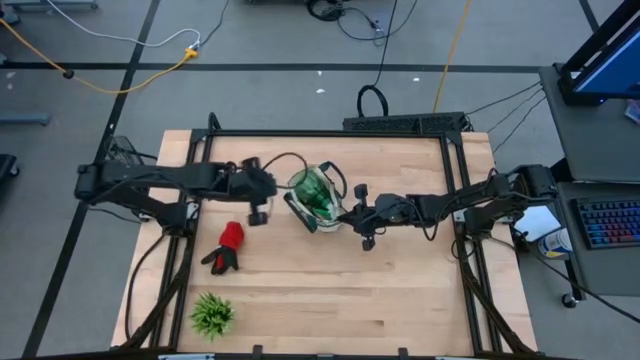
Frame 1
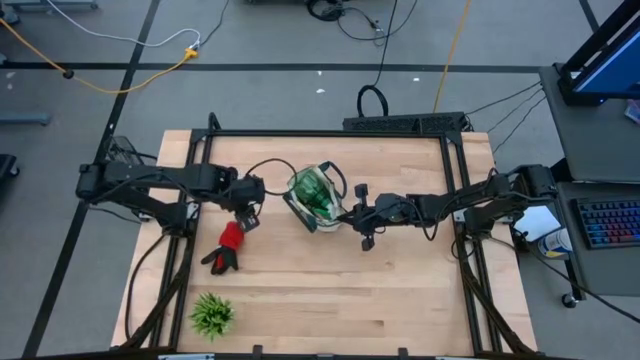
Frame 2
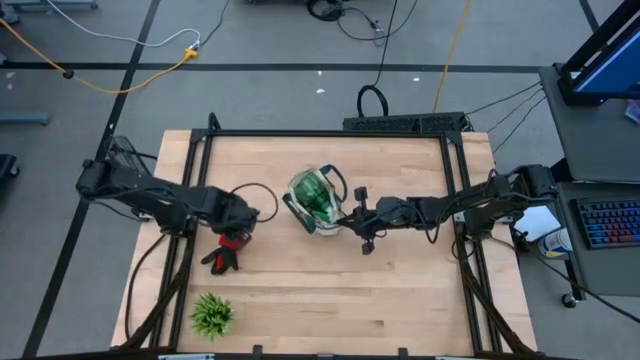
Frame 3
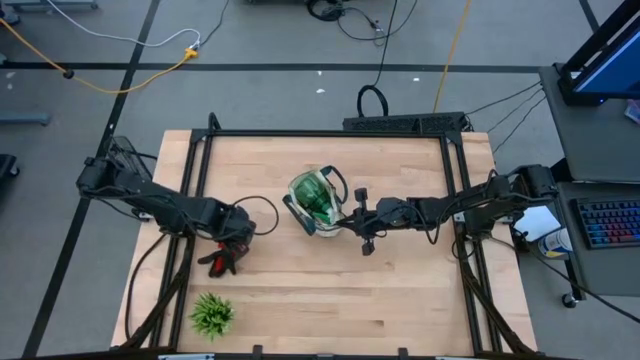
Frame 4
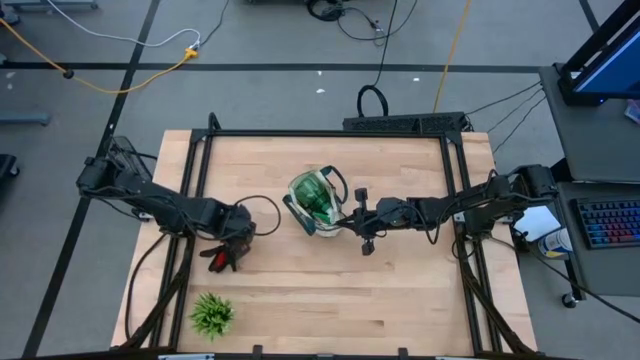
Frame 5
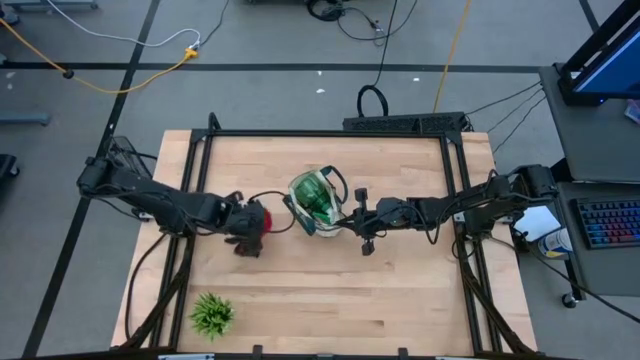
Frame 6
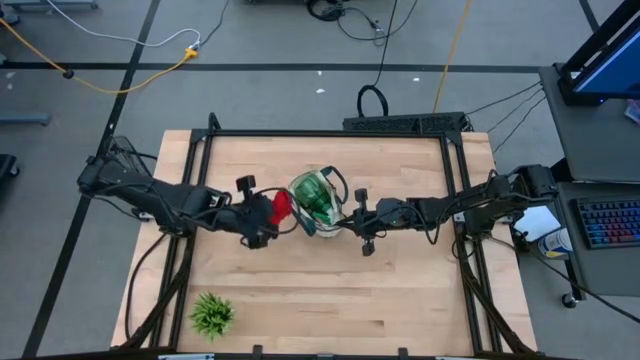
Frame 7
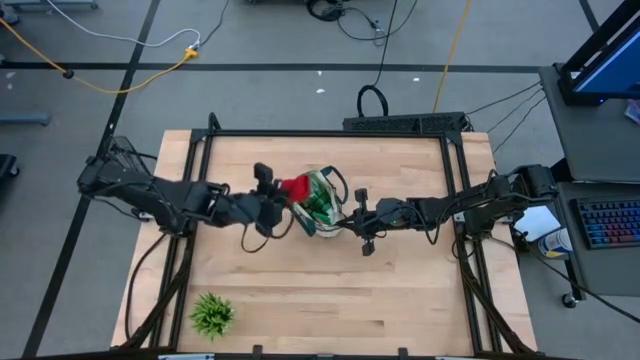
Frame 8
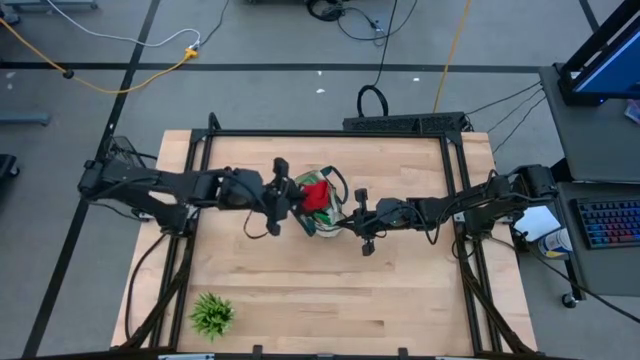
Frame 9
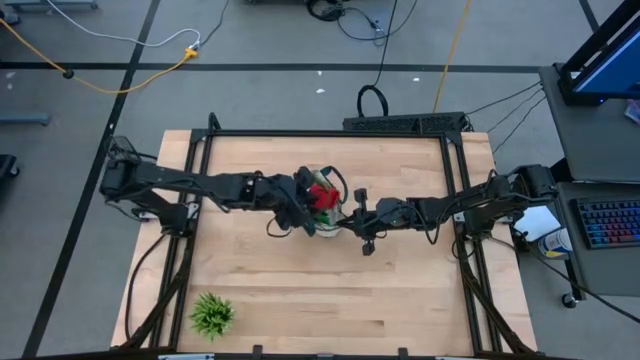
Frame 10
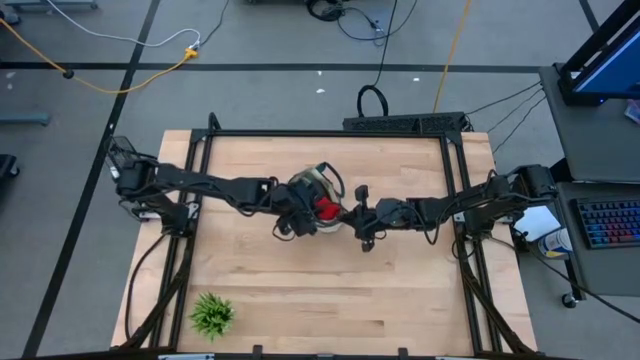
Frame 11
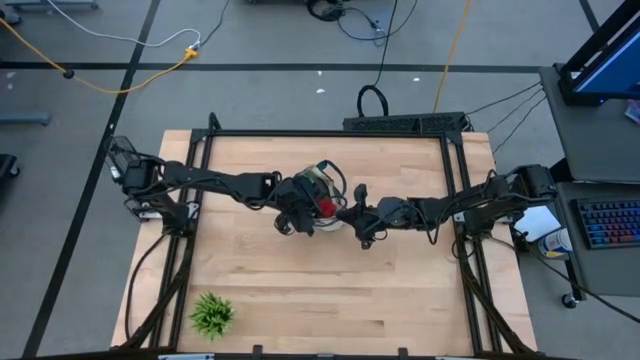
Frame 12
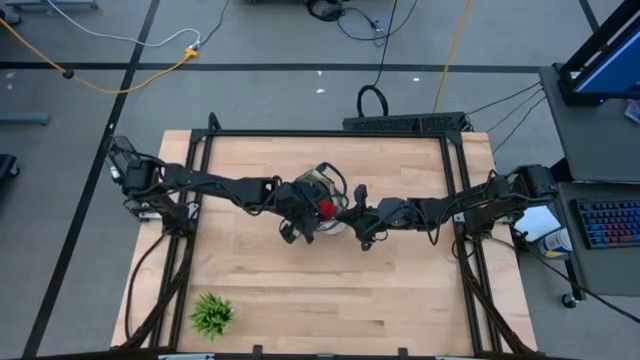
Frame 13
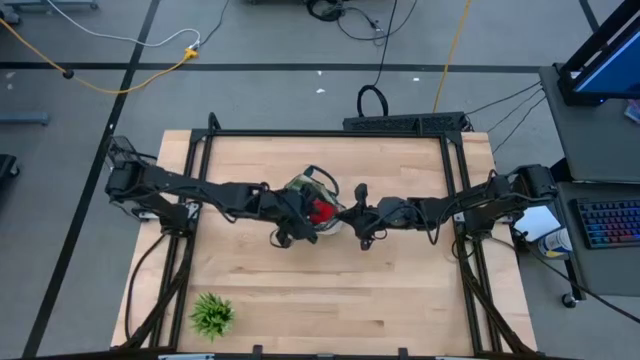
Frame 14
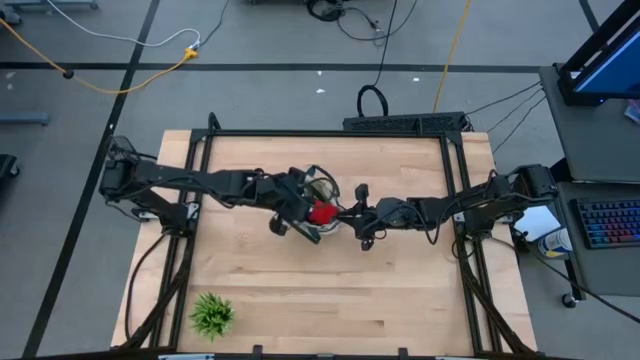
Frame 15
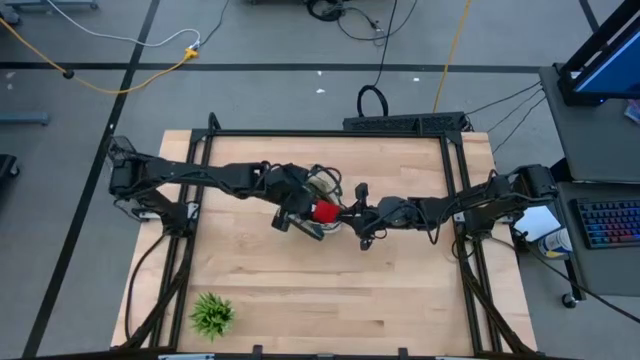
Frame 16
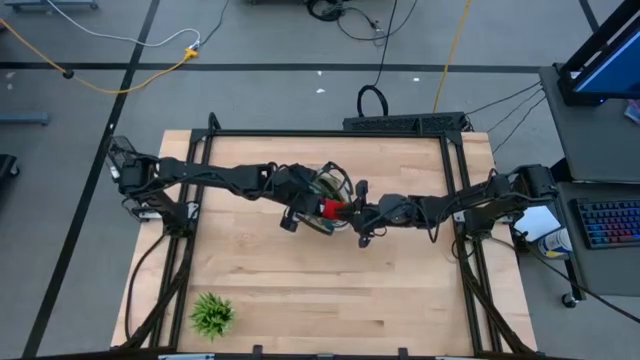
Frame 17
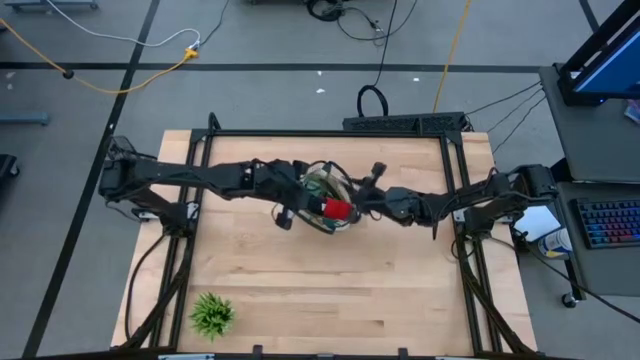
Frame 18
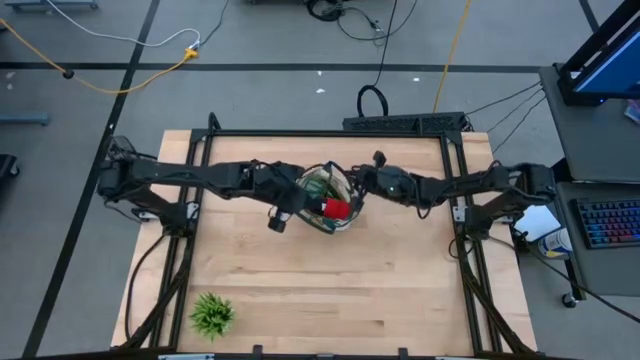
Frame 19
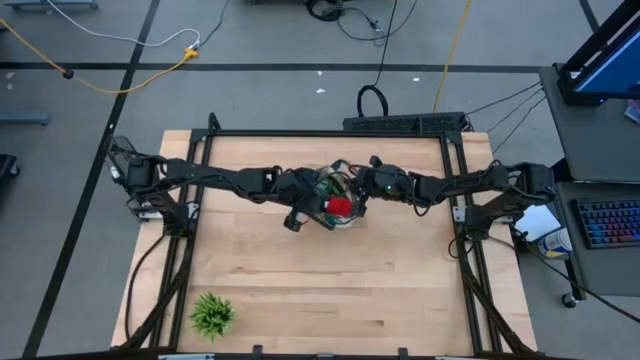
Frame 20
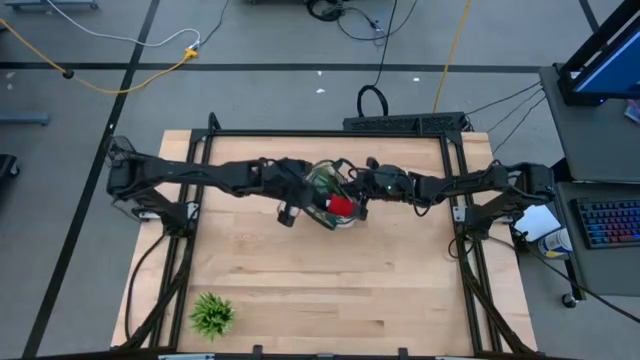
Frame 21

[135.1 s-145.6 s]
Task: Pick & Place Garden tools in Gardening bag
Put the red gloves into the gardening bag

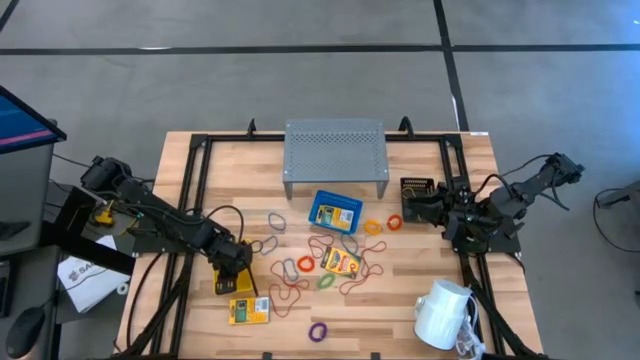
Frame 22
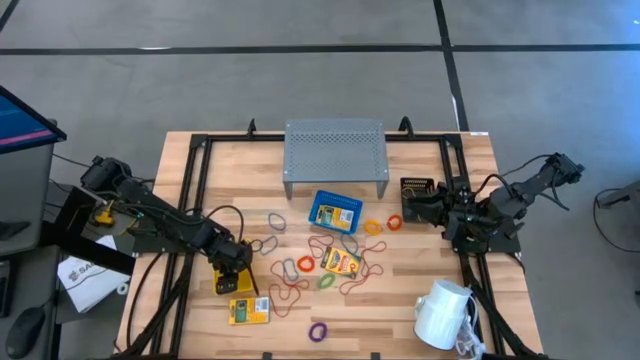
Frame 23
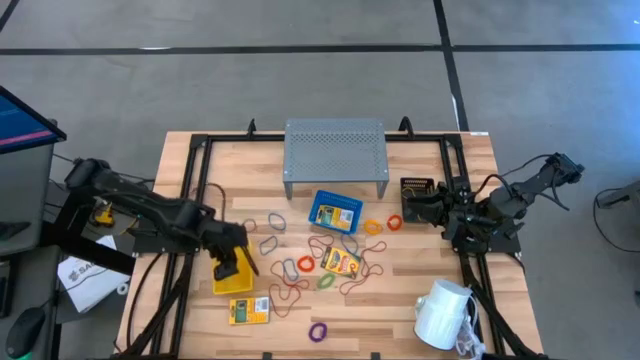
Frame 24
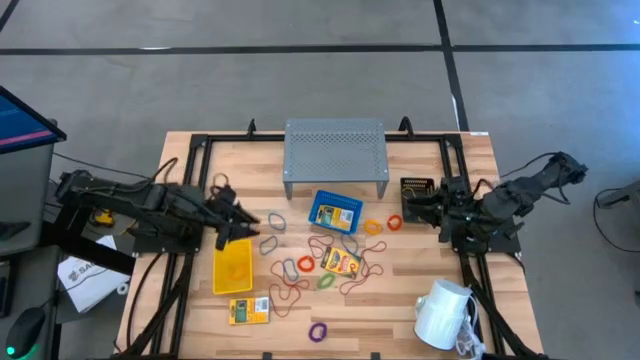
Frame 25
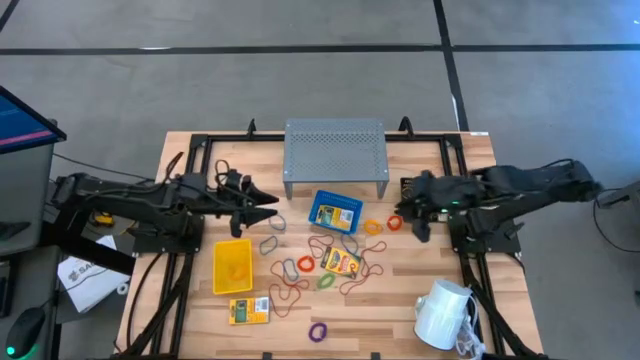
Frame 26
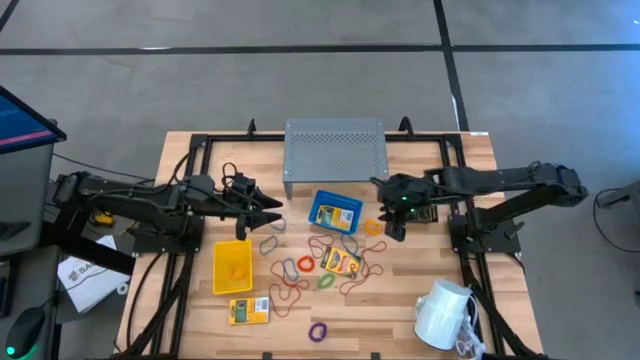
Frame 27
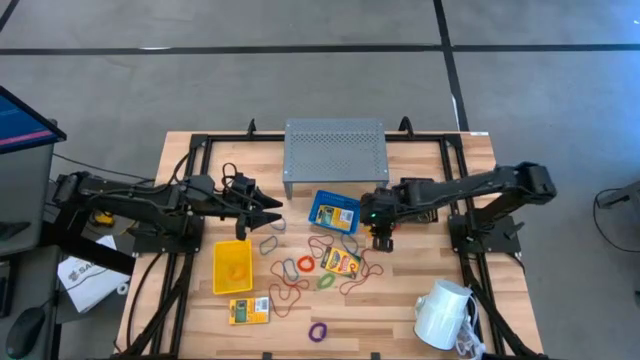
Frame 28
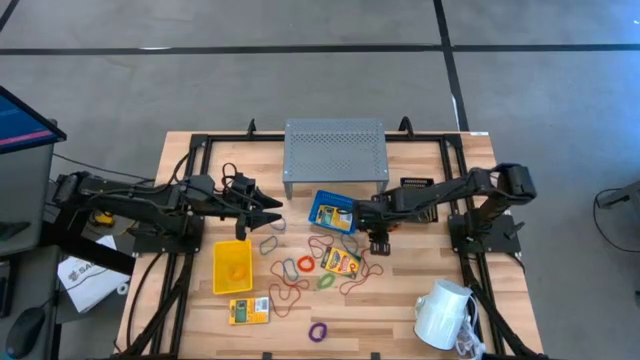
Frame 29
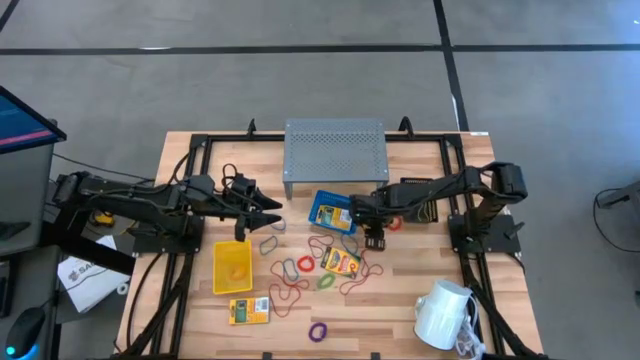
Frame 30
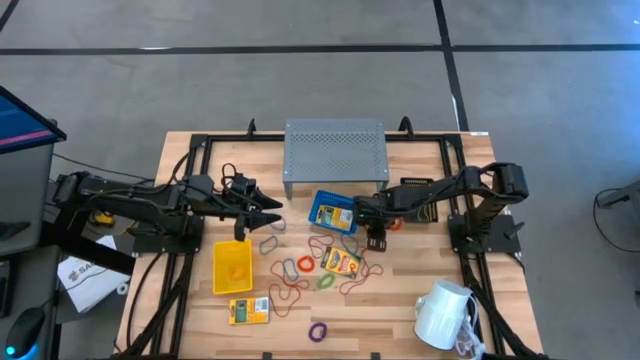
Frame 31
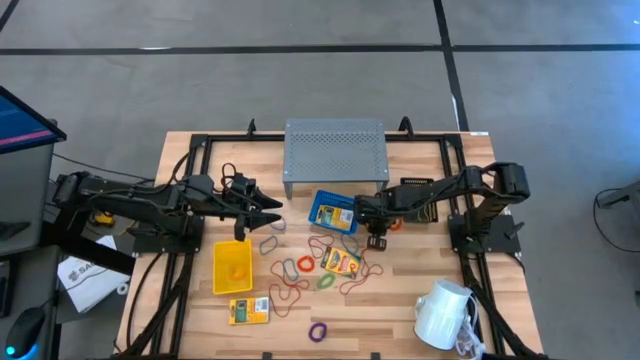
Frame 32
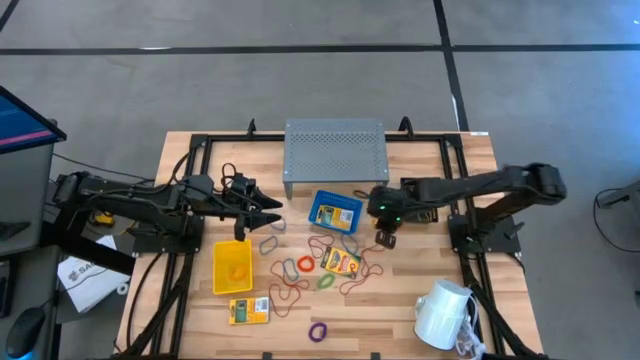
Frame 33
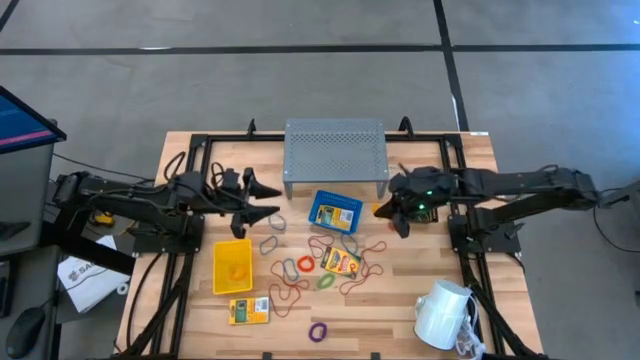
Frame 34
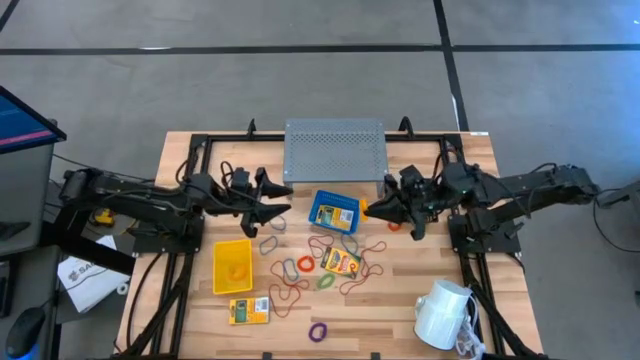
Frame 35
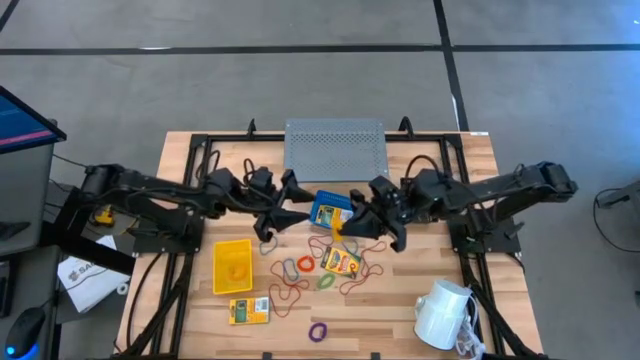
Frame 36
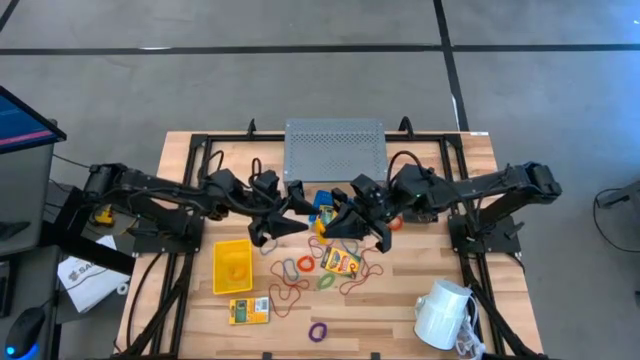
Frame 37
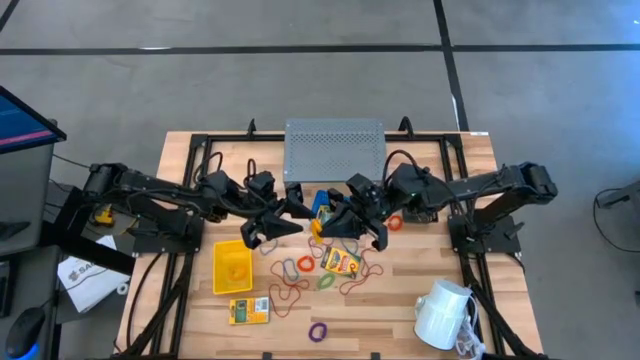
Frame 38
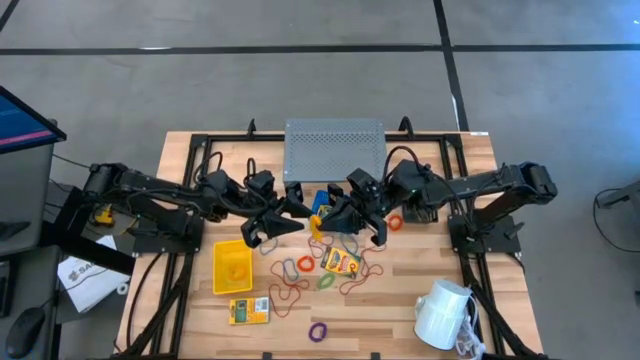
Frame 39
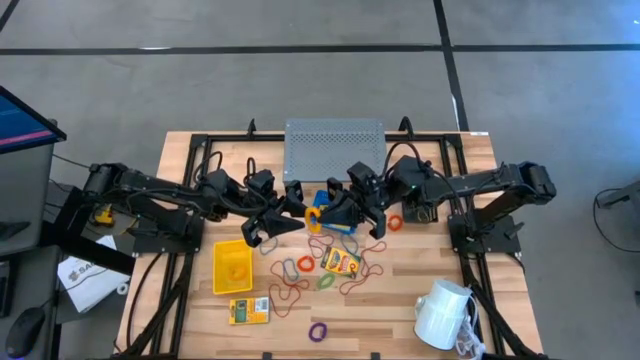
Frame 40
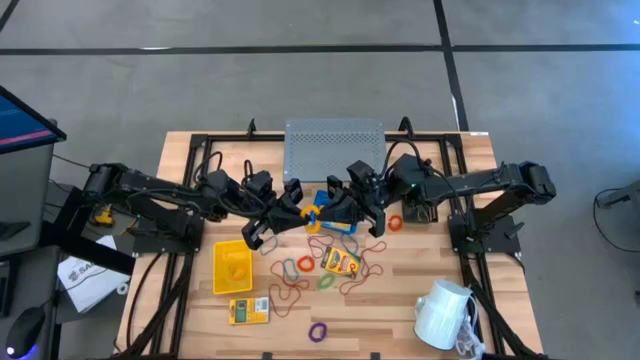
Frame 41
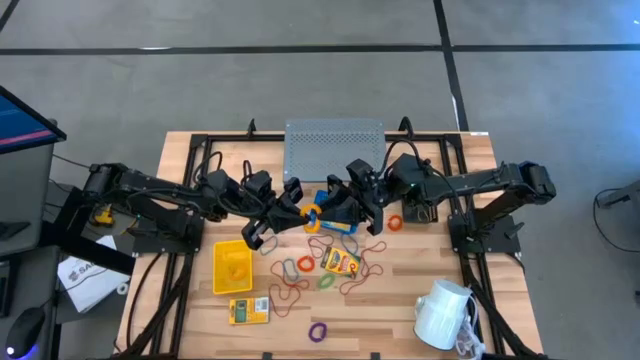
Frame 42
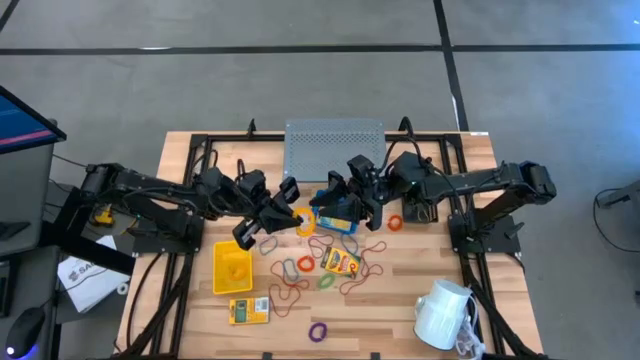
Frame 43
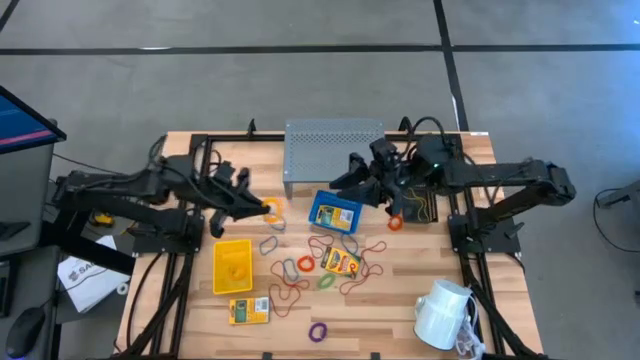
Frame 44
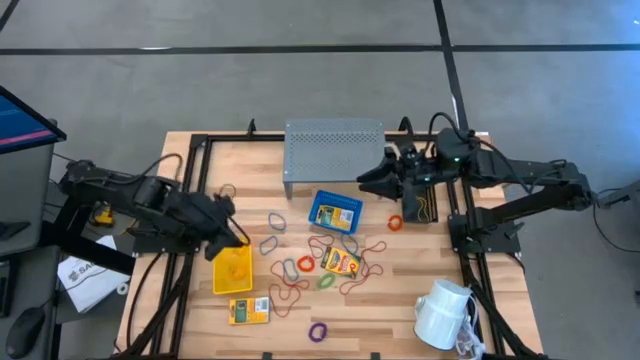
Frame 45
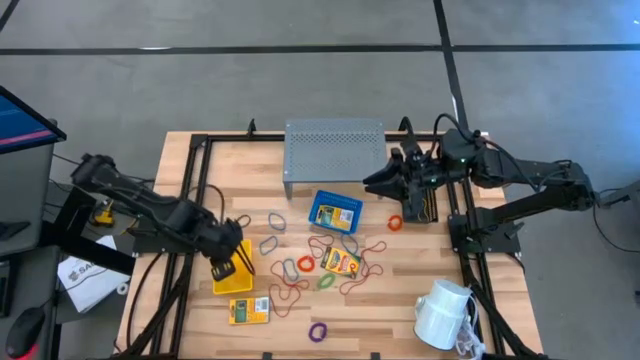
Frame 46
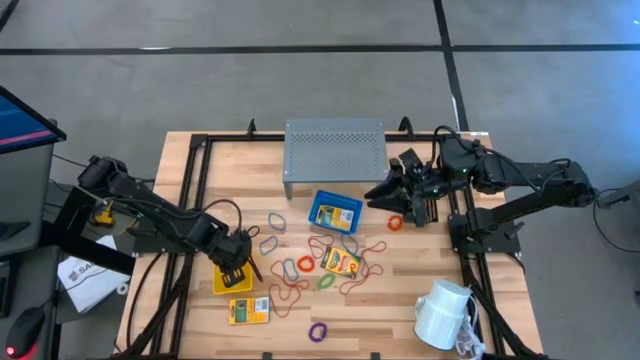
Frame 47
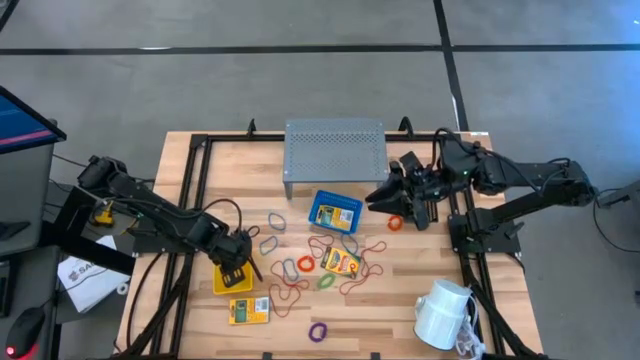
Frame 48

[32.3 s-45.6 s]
Task: Pick & Place Office Desk Supplies
Put the yellow spring keychain into the yellow bin
